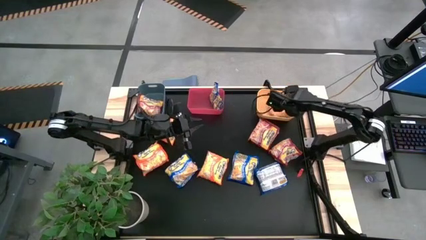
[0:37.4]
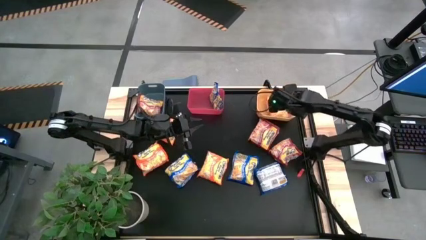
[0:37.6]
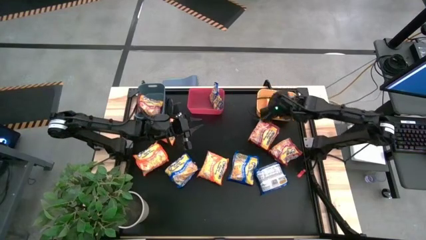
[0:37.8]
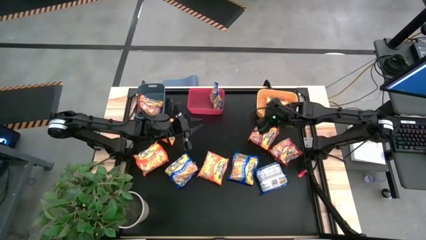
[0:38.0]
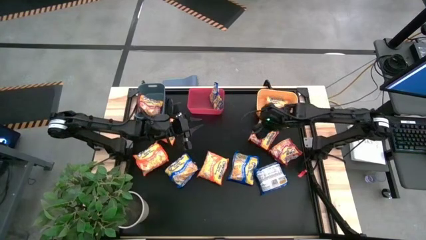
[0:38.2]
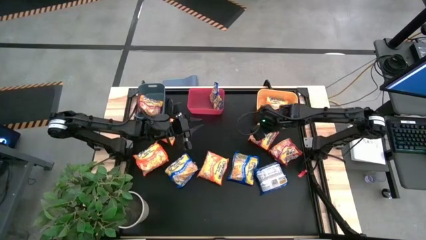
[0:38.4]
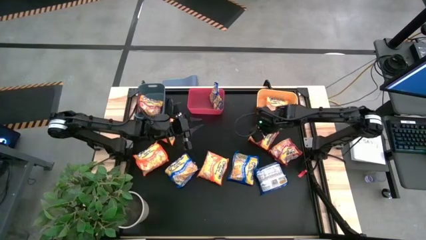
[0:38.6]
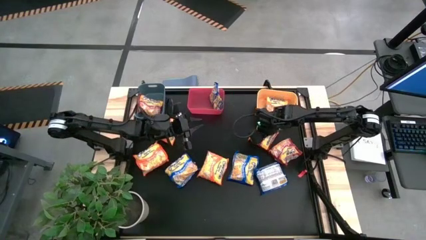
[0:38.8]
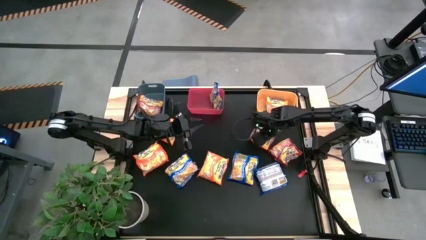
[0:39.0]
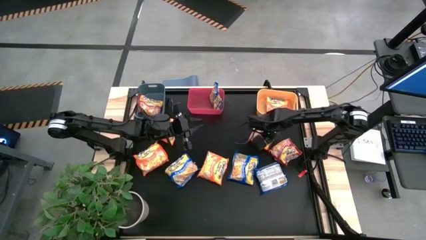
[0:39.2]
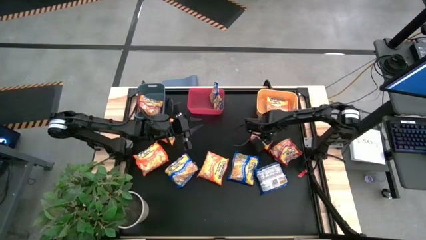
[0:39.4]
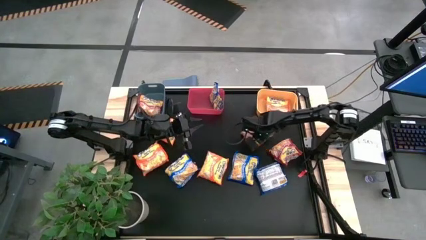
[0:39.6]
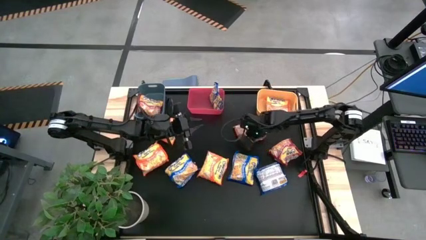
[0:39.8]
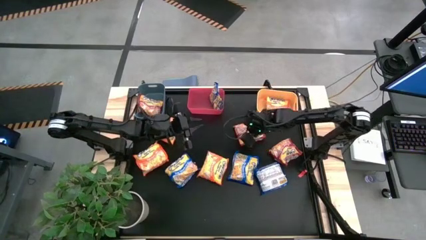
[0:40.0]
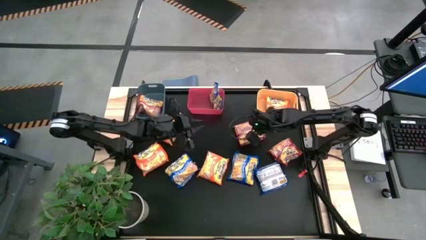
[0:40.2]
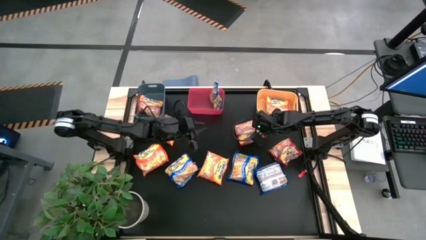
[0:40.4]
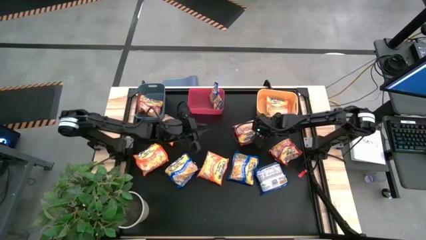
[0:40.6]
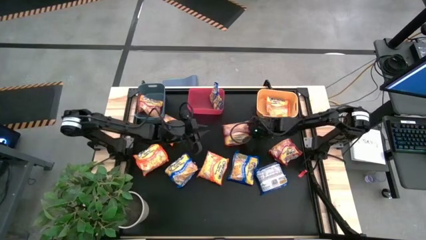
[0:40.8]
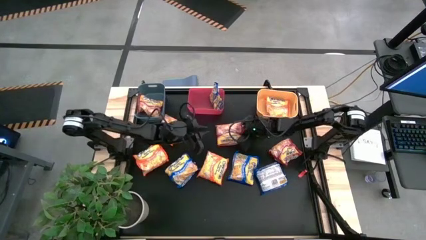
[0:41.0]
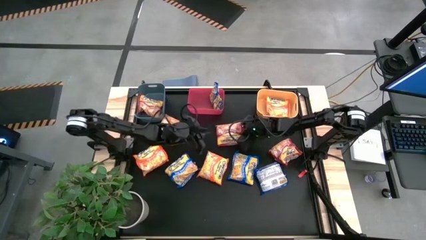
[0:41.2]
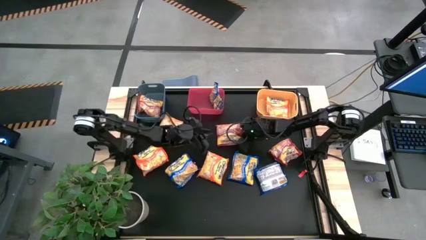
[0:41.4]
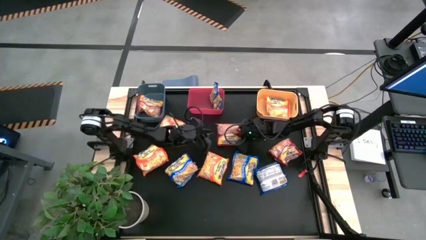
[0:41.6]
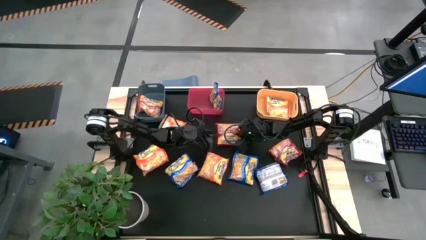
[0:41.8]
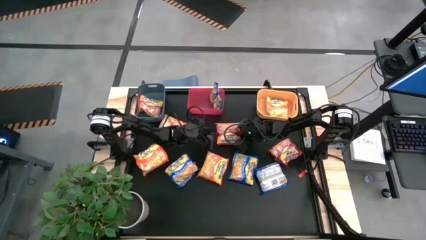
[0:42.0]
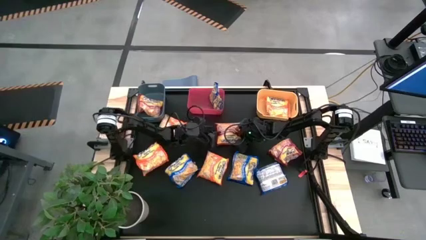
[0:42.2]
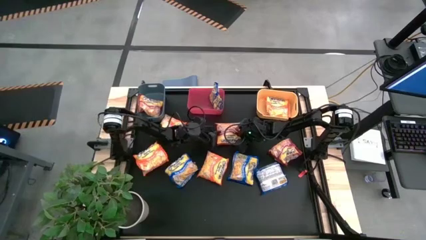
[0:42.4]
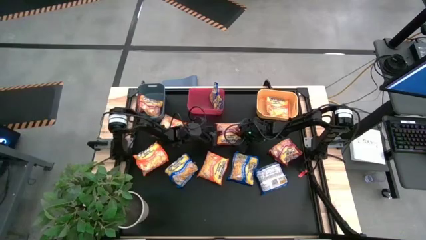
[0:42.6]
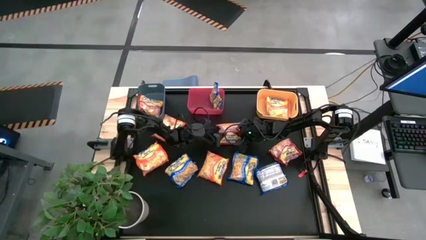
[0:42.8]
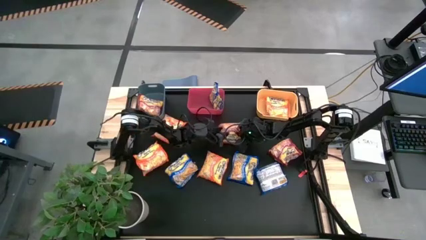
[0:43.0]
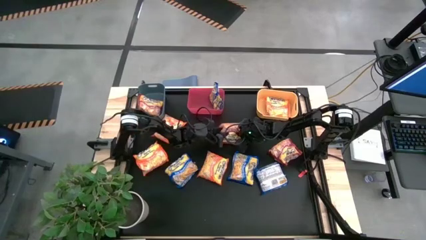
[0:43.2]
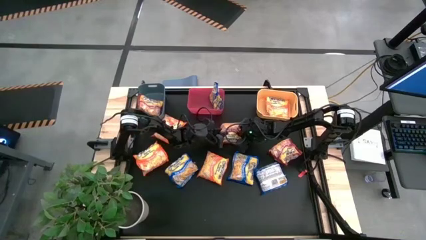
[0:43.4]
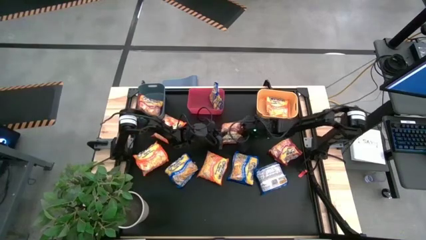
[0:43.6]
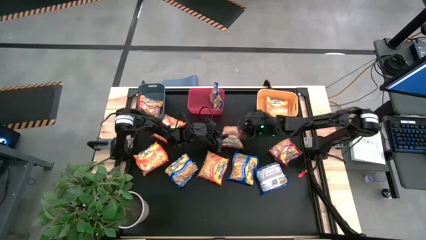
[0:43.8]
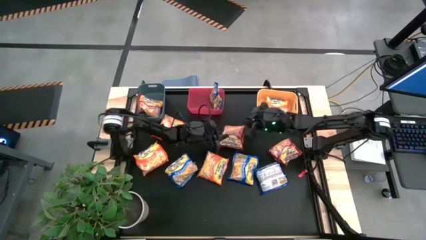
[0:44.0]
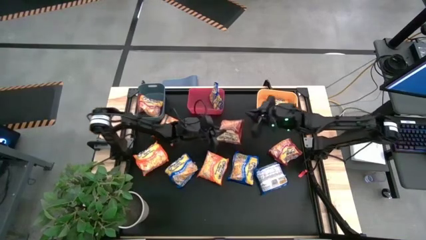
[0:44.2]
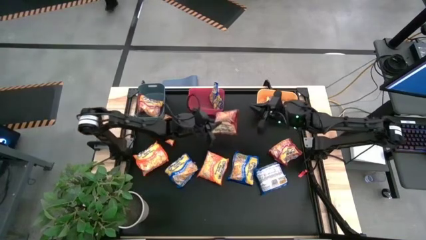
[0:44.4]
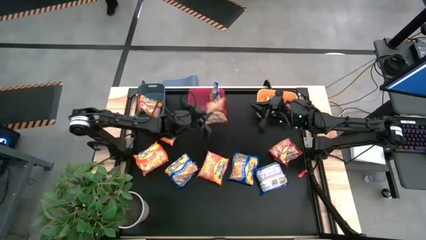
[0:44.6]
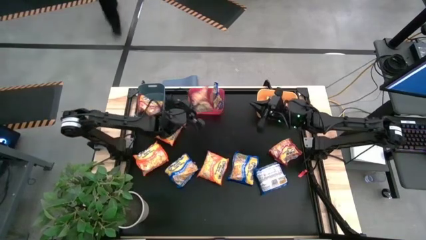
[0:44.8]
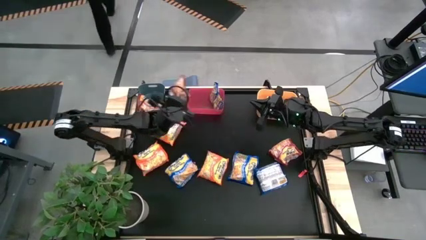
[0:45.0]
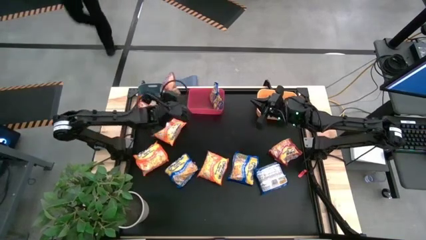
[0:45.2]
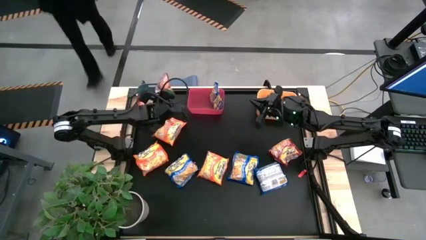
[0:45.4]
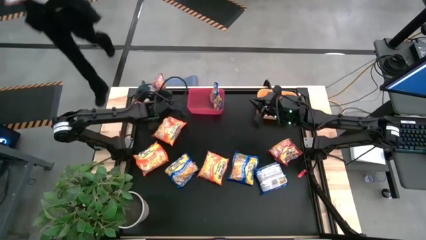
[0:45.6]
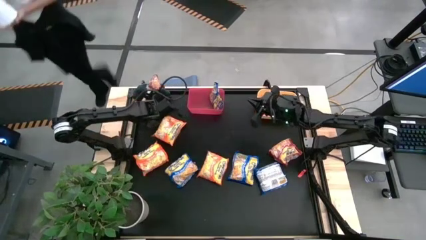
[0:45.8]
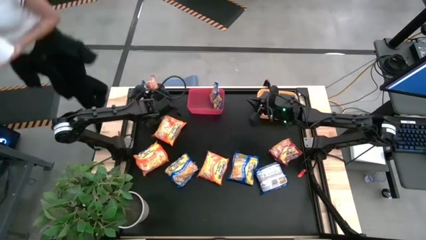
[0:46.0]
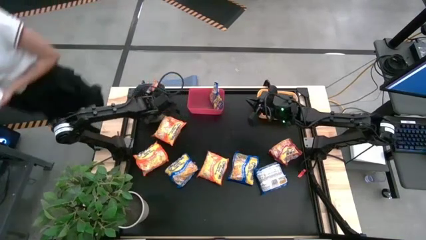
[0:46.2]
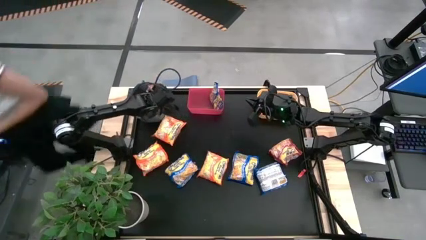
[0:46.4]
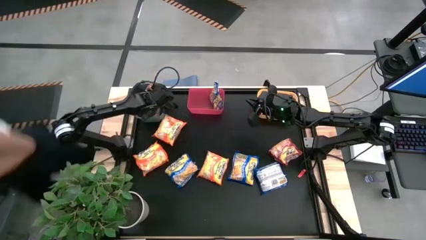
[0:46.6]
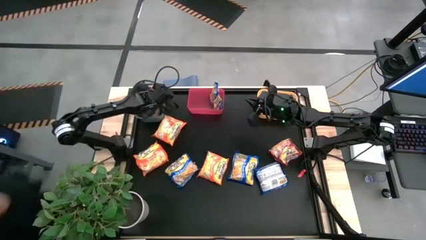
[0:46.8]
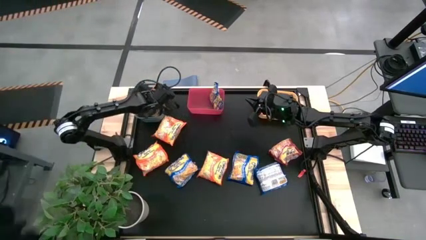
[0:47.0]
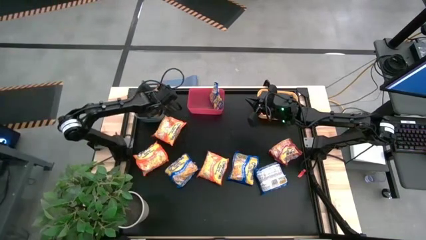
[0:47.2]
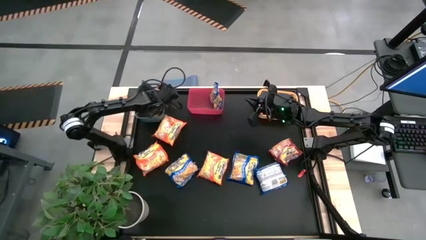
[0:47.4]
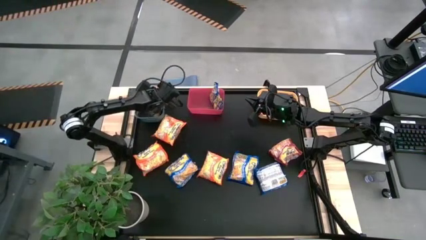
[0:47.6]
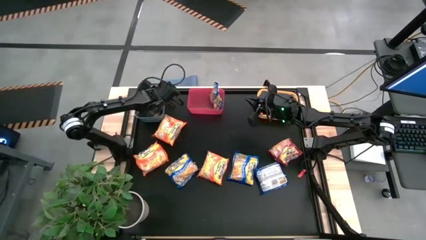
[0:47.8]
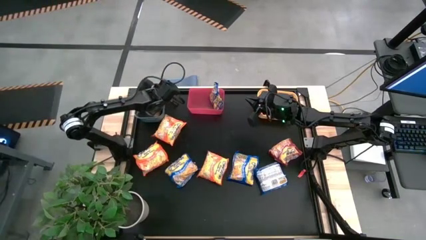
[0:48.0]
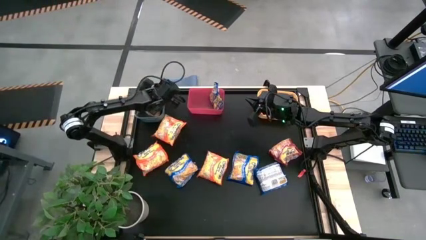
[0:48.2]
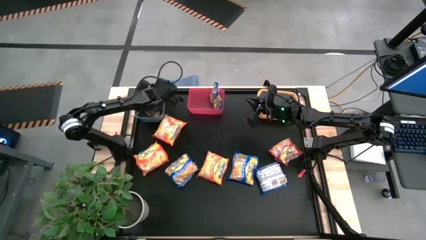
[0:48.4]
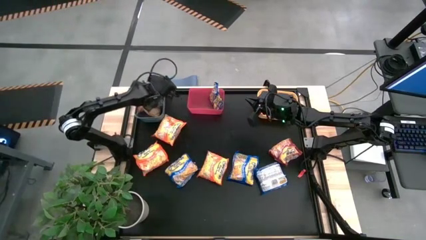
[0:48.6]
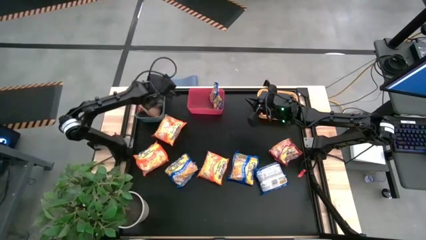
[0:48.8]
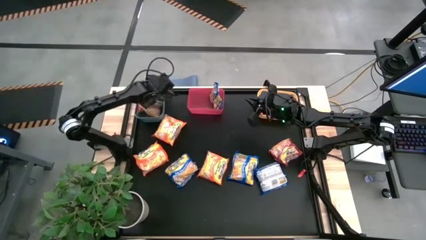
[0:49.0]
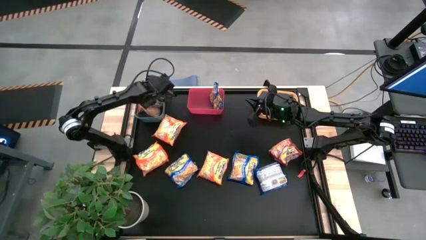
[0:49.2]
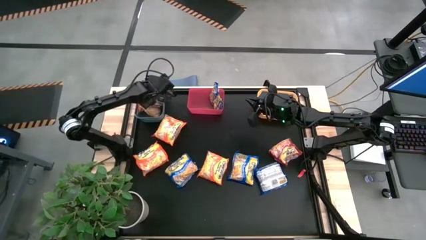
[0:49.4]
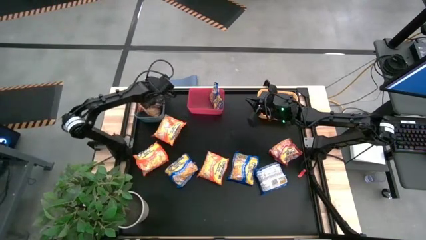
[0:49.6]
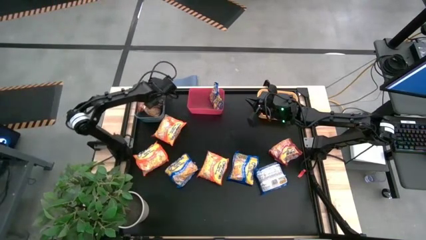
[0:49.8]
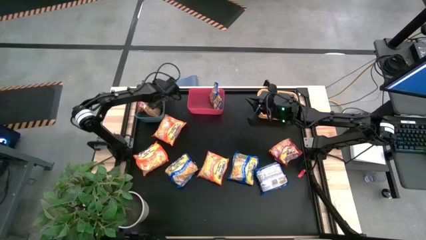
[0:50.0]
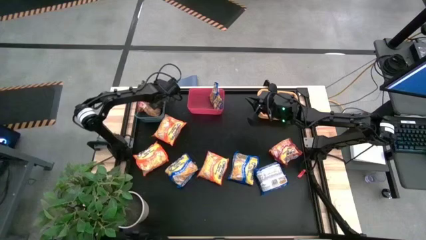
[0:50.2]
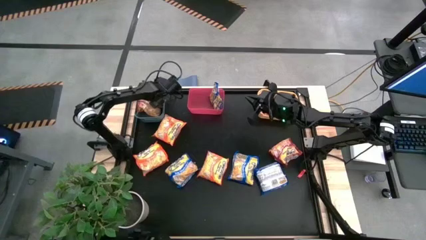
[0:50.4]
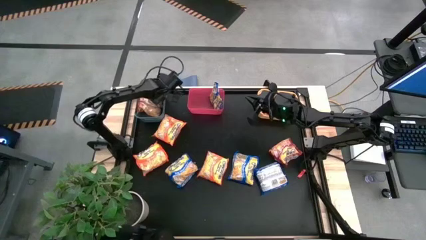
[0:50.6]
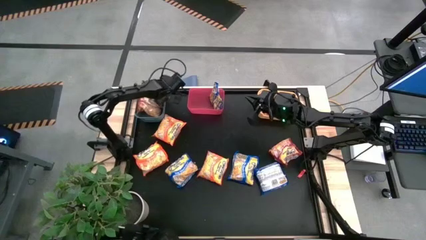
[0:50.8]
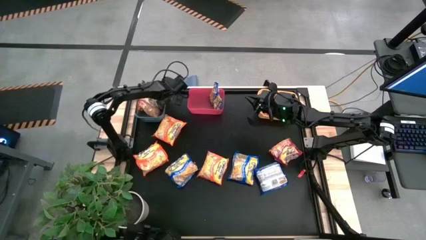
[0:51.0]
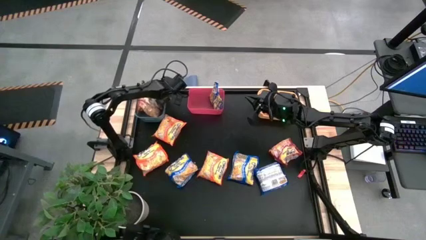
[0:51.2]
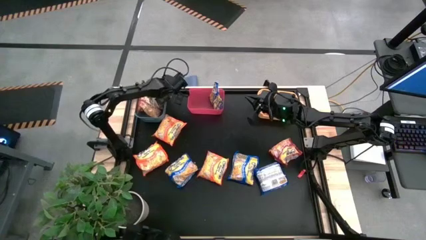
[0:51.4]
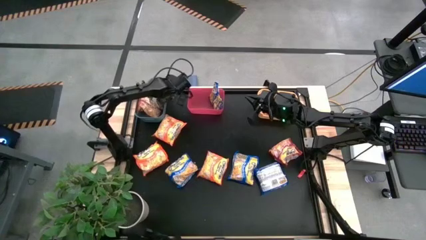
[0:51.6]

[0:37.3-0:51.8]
Task: Sort Maruchan noodles
Put the red noodle pack into the gray bin
